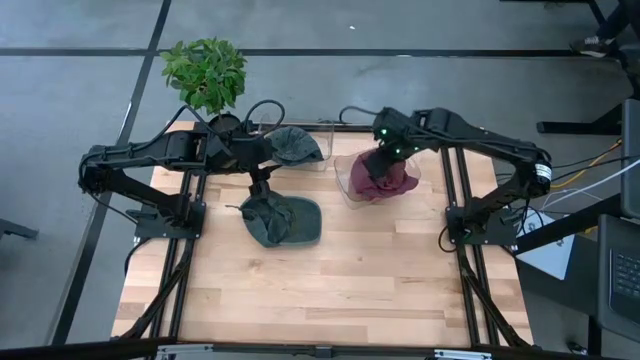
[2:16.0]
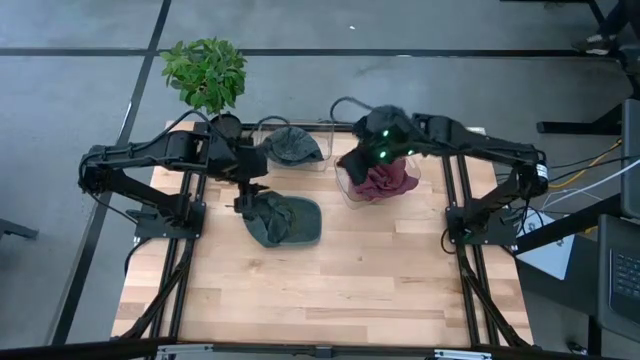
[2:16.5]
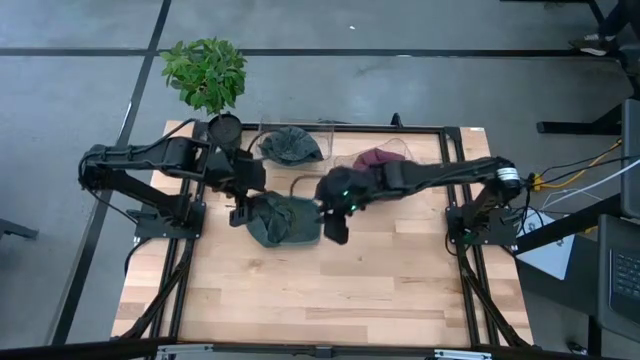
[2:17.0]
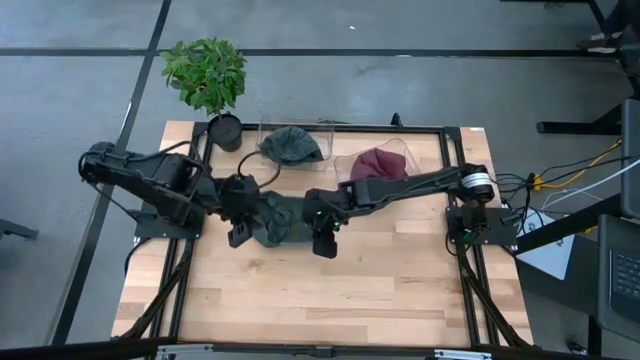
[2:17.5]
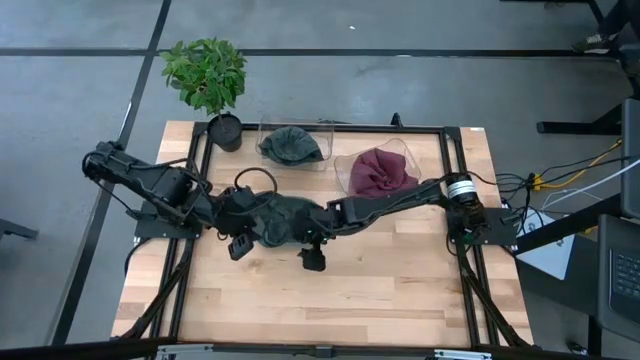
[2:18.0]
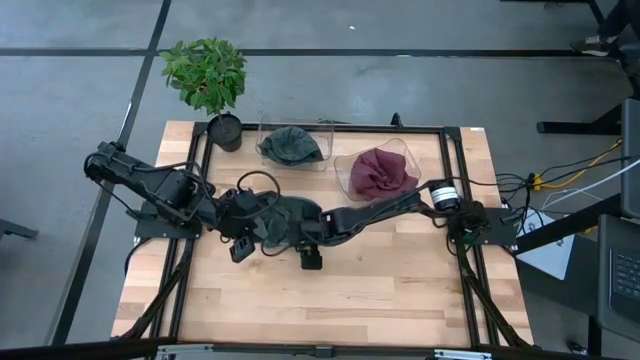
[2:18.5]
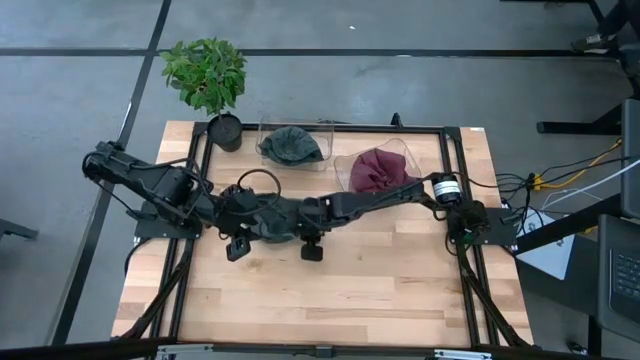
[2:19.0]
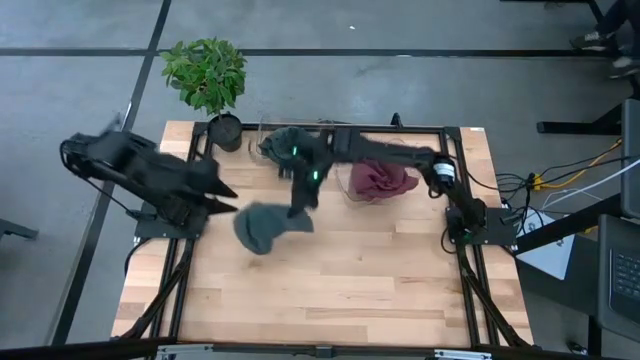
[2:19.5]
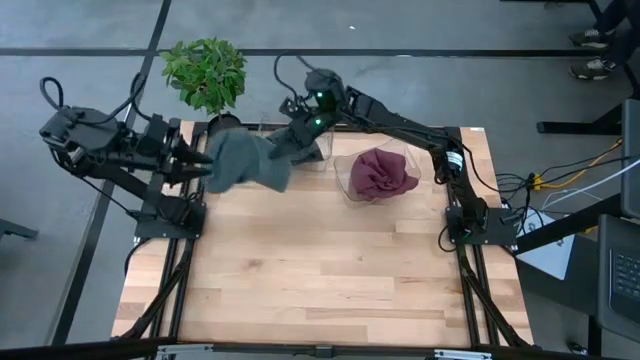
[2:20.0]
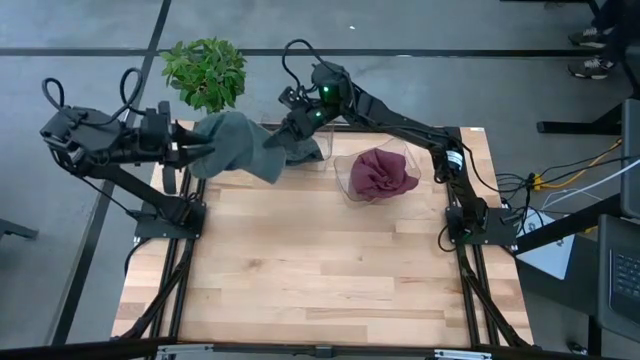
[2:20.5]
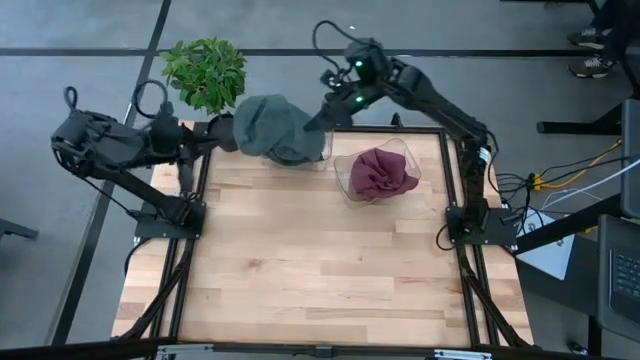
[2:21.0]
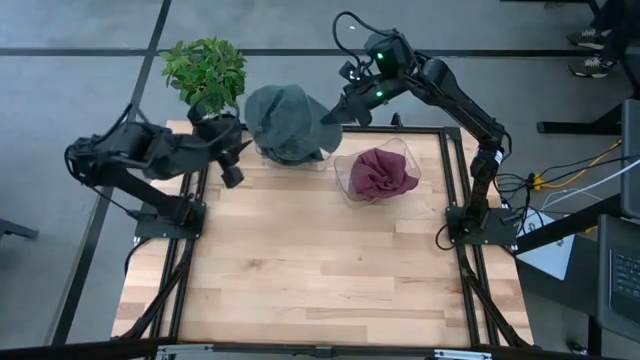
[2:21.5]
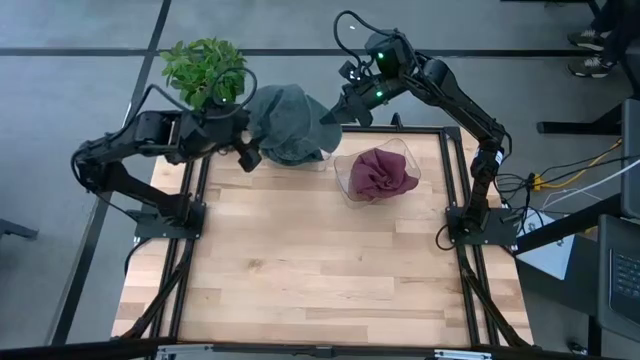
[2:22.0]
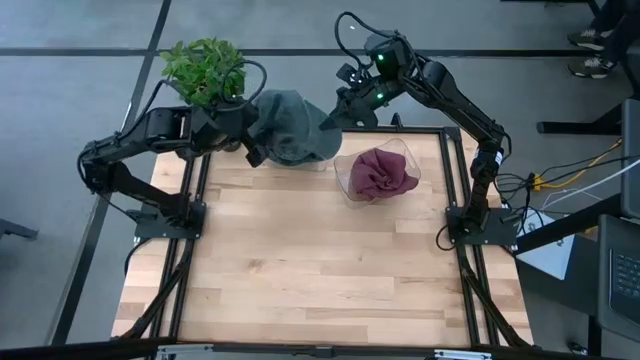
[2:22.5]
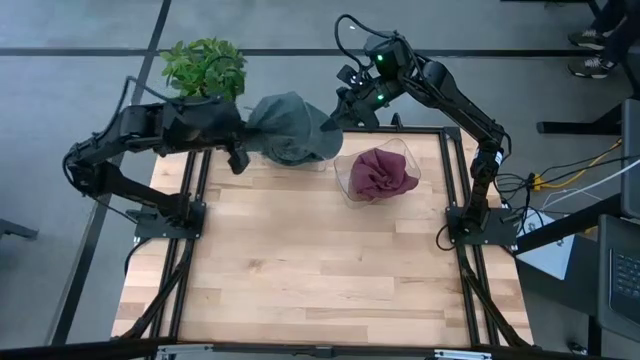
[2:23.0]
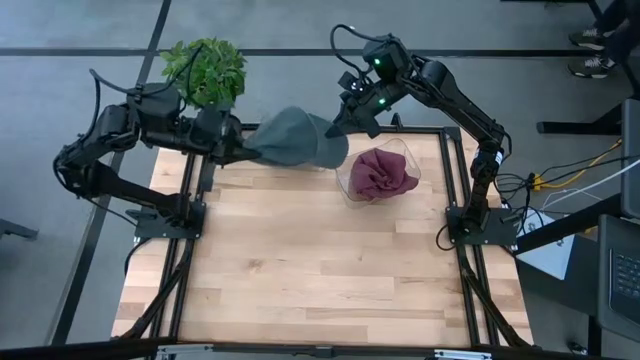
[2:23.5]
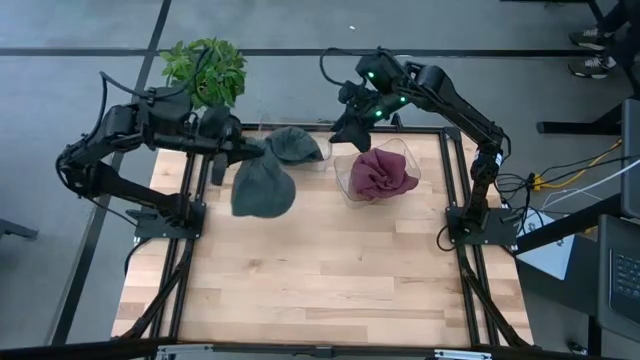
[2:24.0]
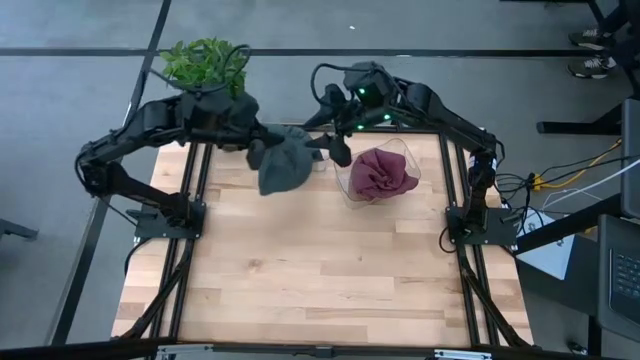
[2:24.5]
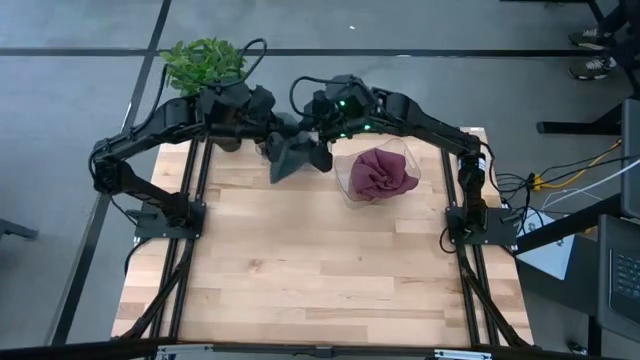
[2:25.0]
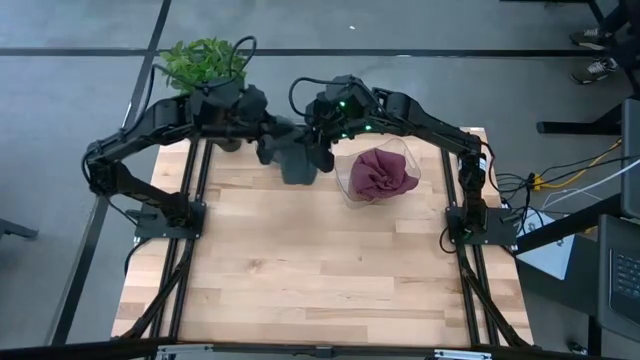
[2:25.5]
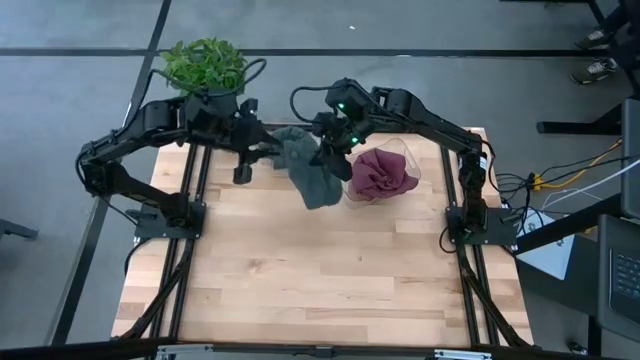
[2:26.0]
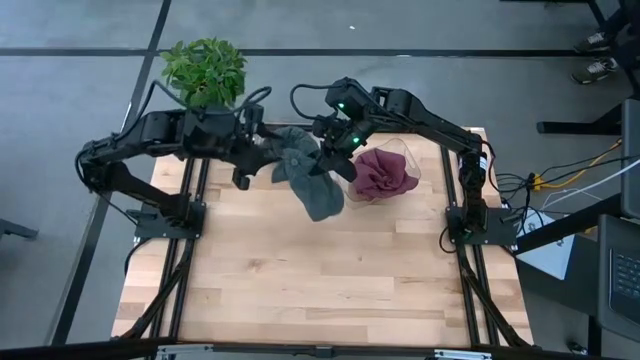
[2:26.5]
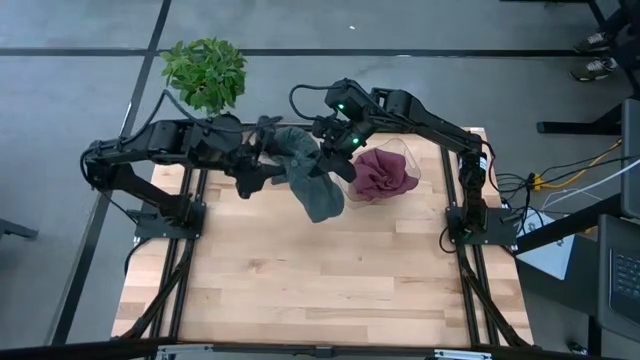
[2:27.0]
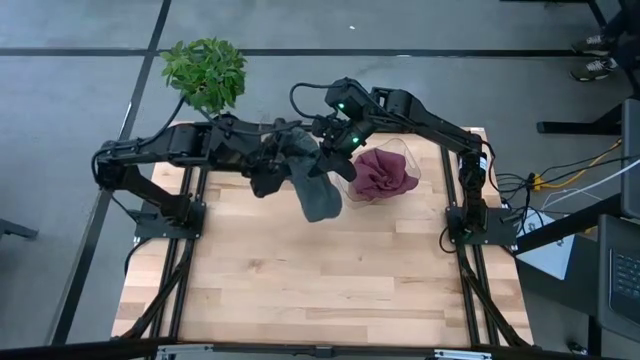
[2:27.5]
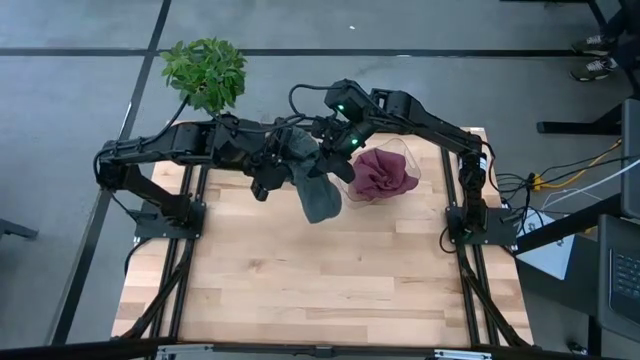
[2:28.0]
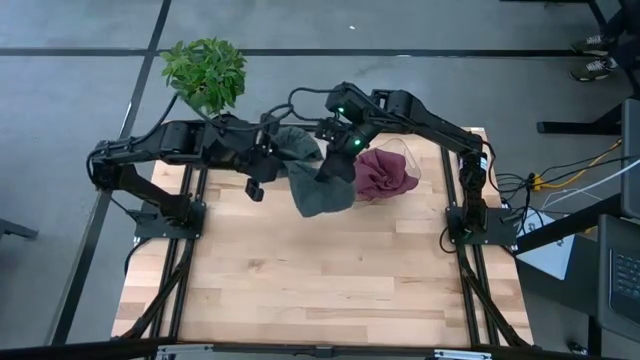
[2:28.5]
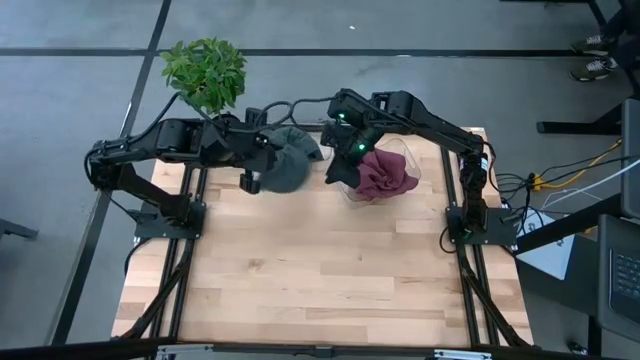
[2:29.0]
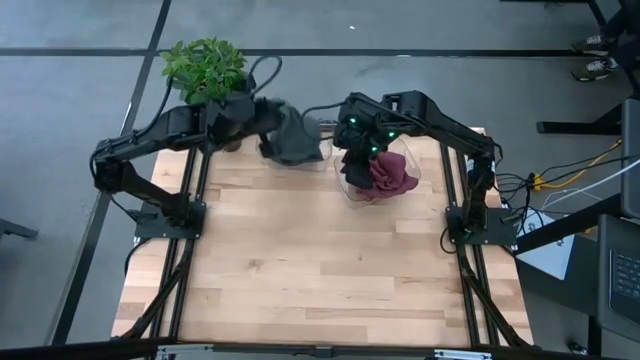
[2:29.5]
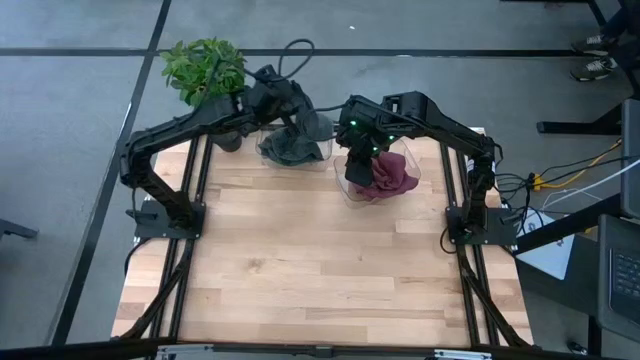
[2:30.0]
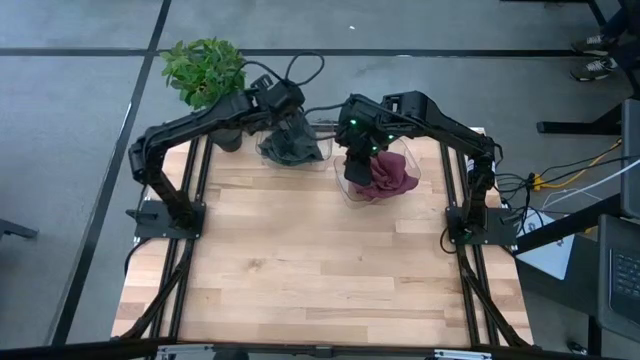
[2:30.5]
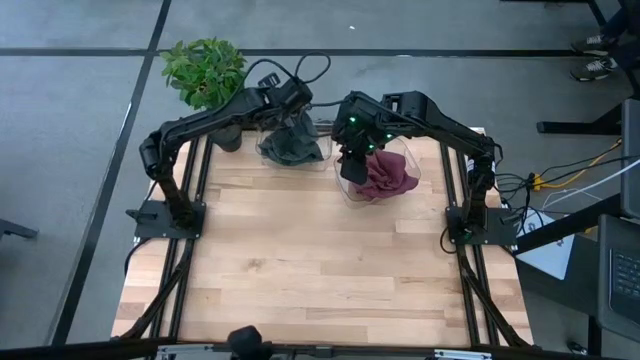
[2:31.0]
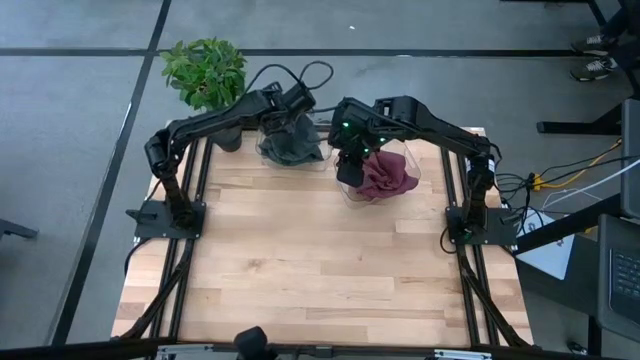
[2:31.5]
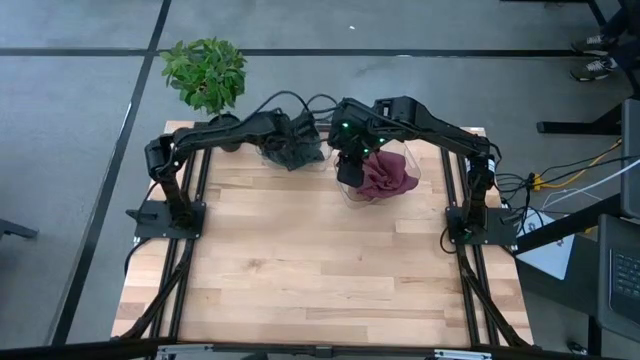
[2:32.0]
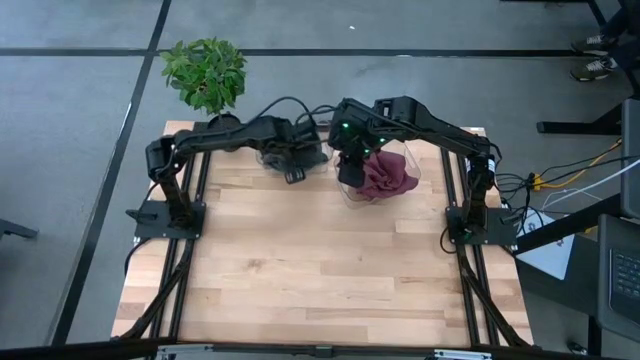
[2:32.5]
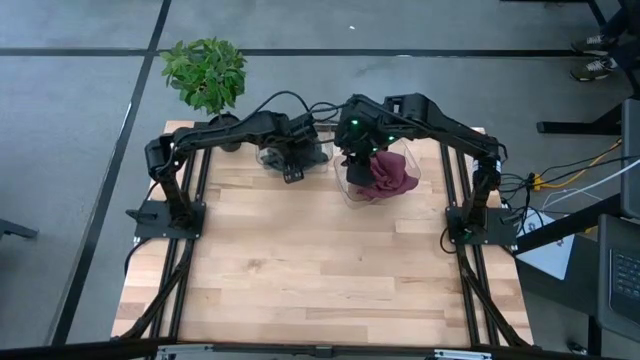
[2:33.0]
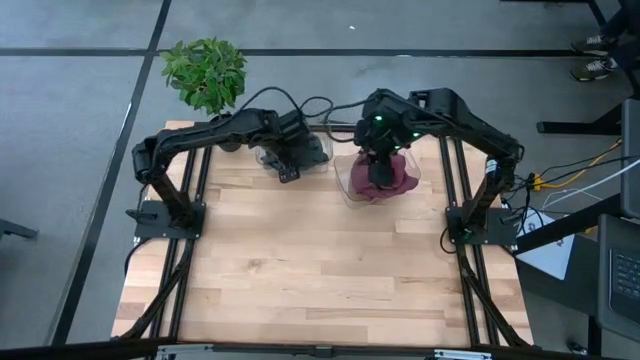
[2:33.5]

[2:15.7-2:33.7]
Task: Pick & Place hat
Put the black cap into the left transparent bin

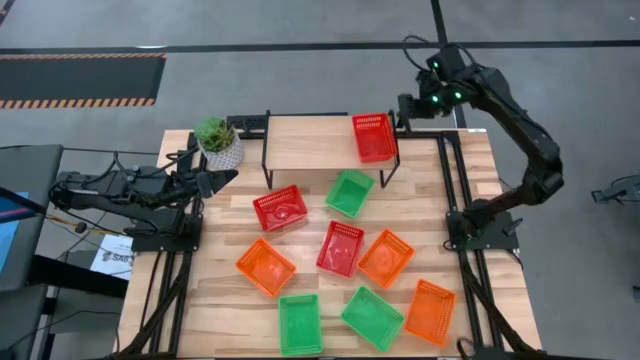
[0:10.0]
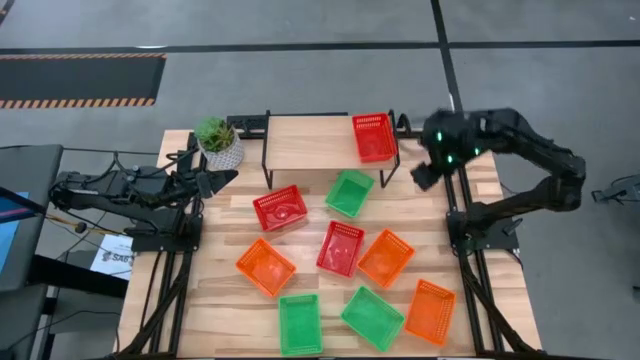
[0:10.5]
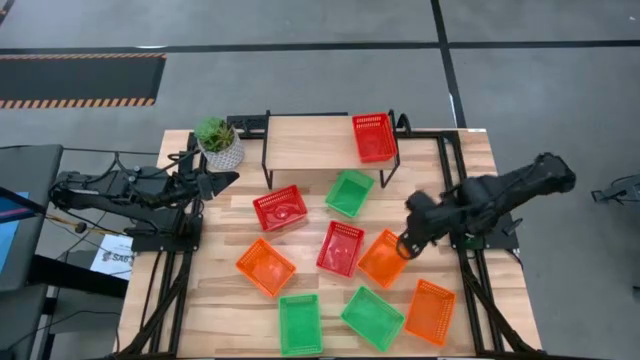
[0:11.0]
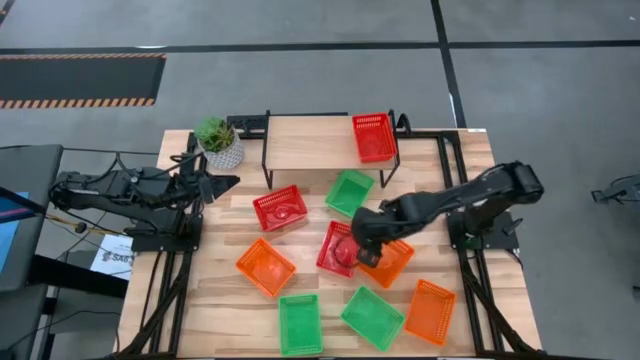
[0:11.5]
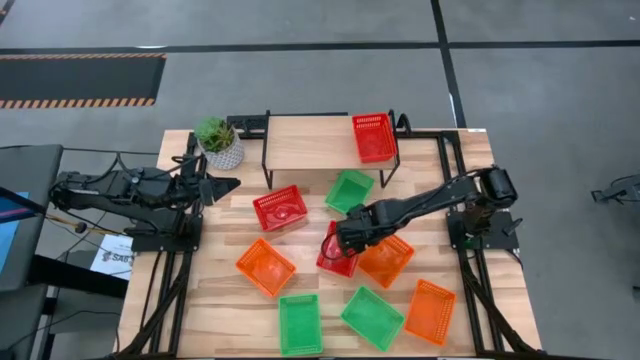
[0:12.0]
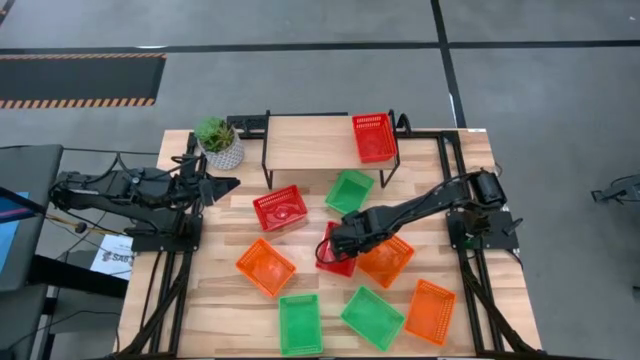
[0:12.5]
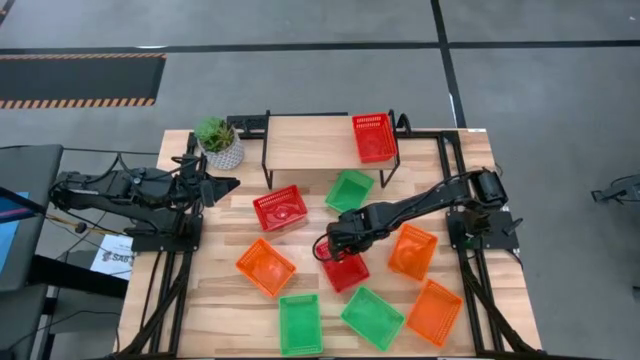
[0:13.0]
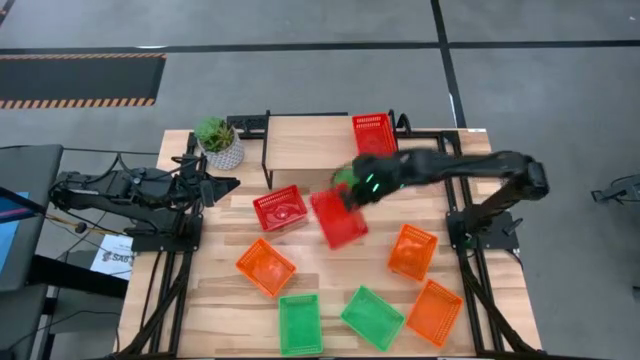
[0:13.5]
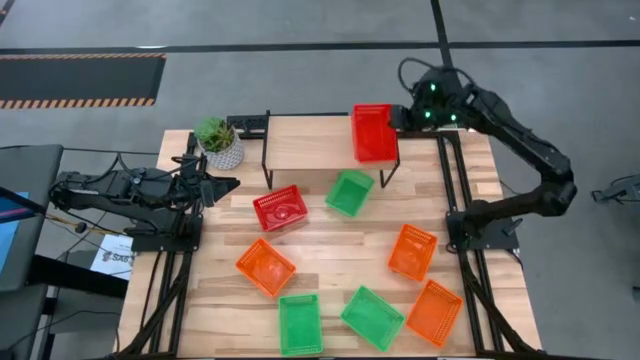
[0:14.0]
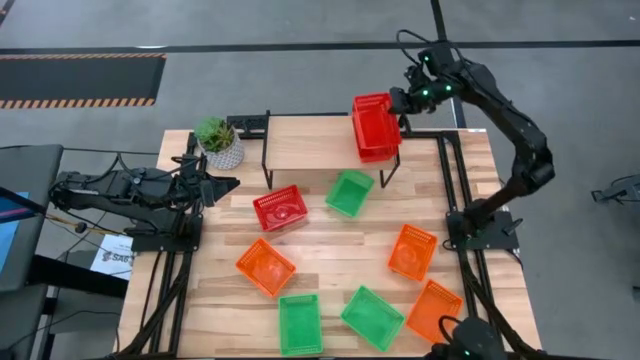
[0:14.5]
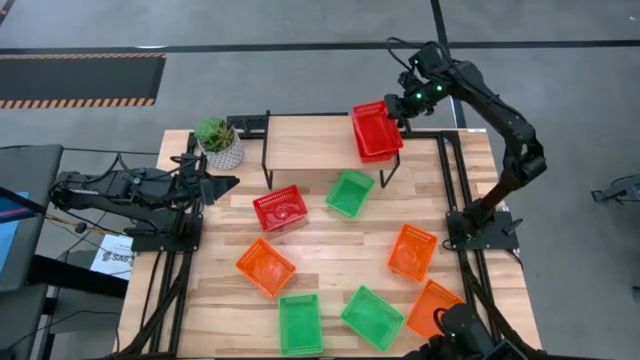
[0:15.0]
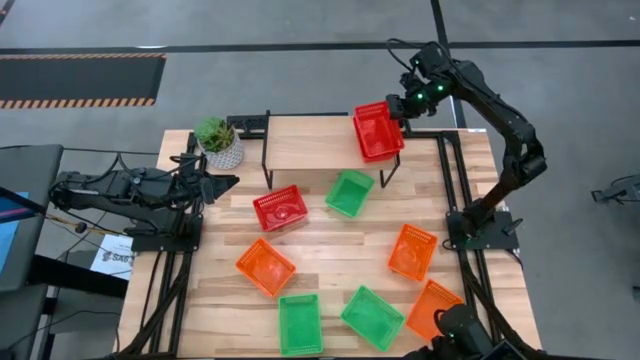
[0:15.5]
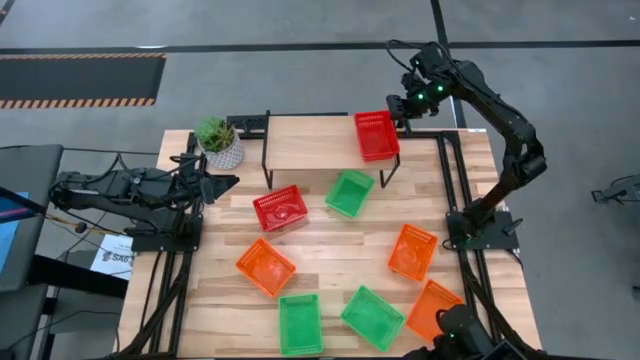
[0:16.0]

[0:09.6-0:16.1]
Task: Stack baskets on shelf by color
Stack the right red bin on top of the red bin on the shelf
